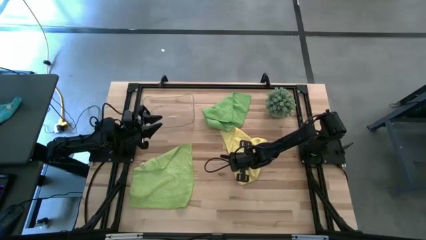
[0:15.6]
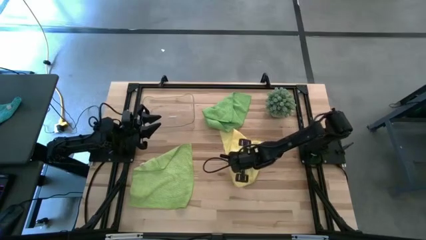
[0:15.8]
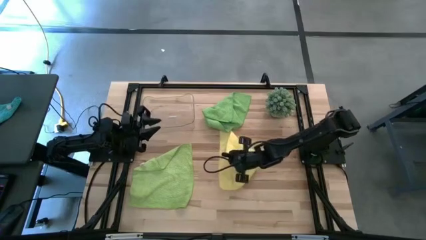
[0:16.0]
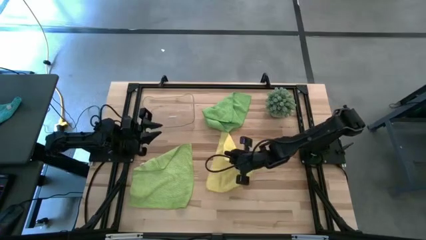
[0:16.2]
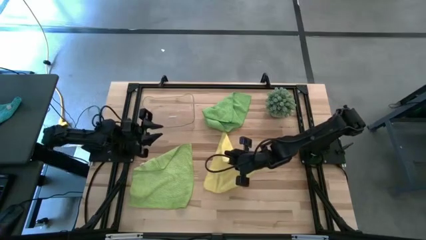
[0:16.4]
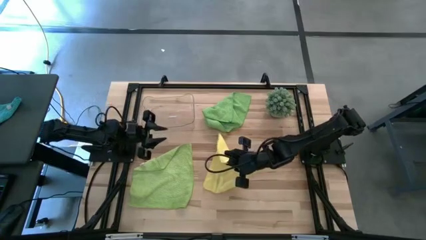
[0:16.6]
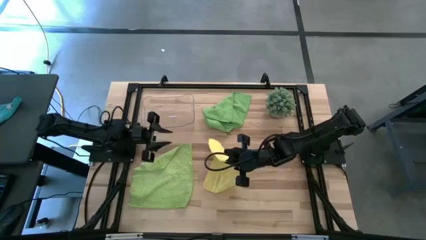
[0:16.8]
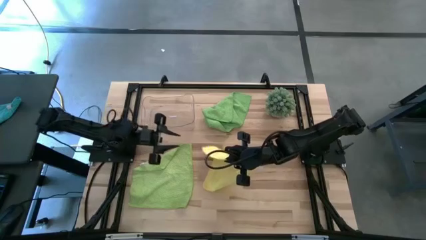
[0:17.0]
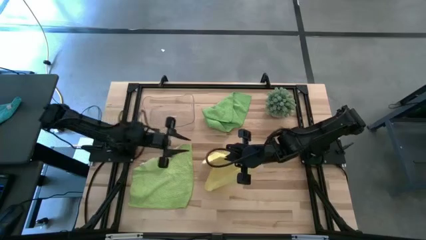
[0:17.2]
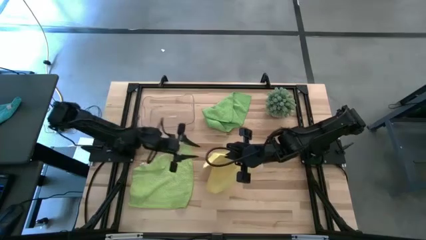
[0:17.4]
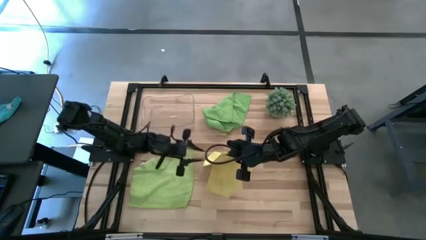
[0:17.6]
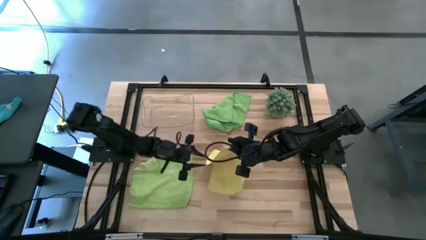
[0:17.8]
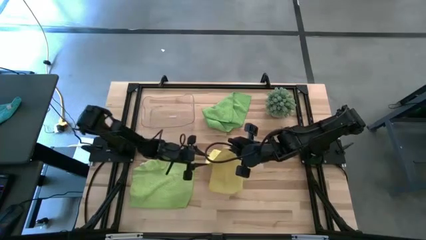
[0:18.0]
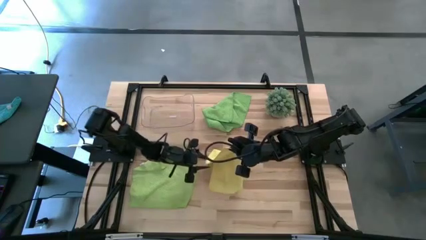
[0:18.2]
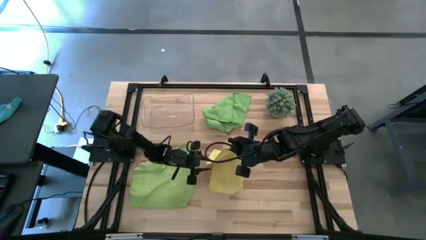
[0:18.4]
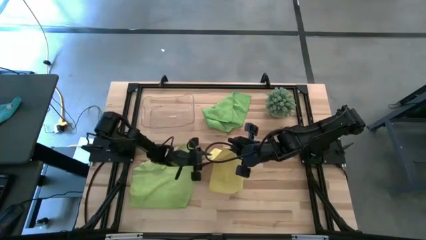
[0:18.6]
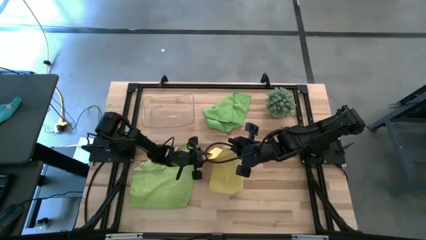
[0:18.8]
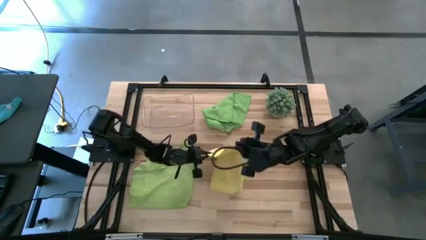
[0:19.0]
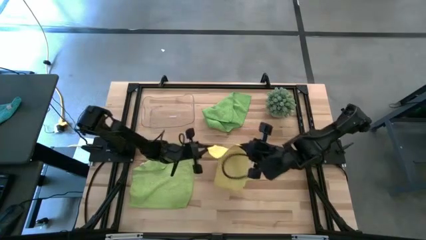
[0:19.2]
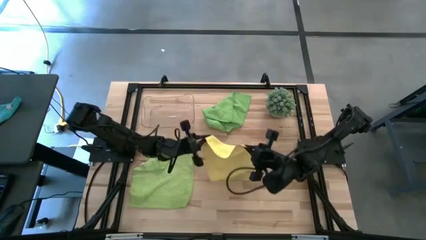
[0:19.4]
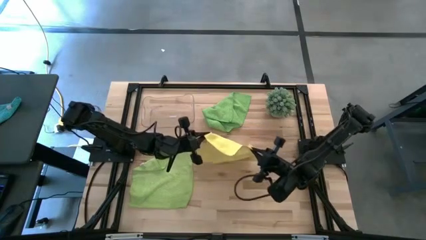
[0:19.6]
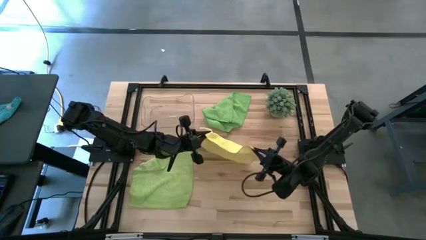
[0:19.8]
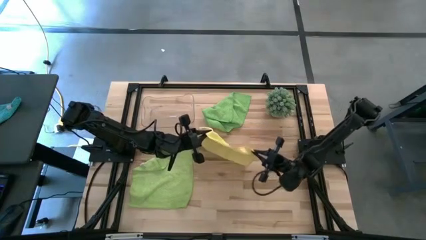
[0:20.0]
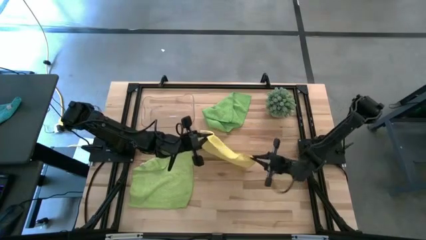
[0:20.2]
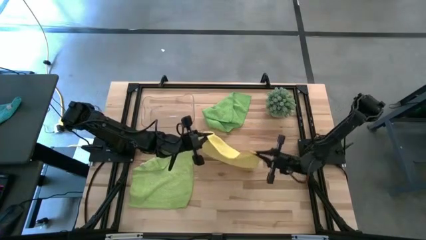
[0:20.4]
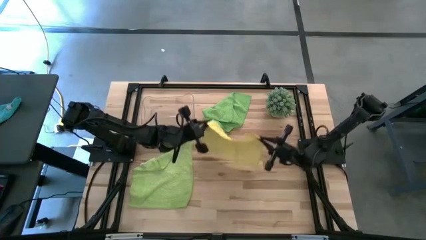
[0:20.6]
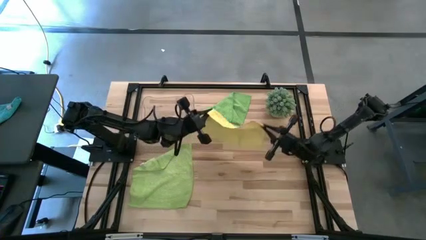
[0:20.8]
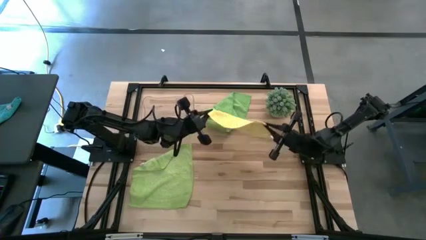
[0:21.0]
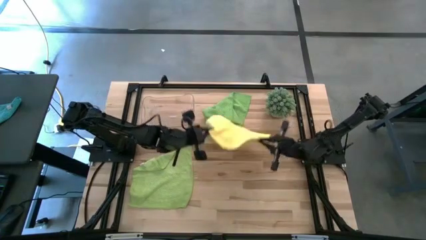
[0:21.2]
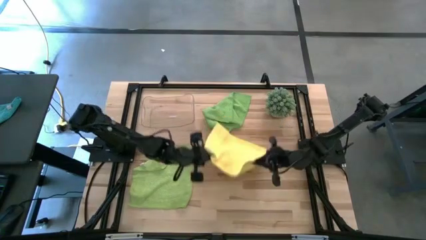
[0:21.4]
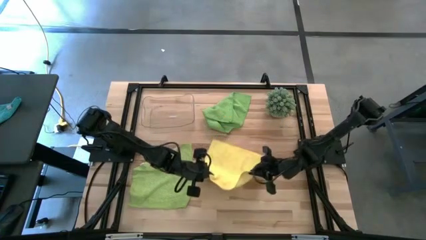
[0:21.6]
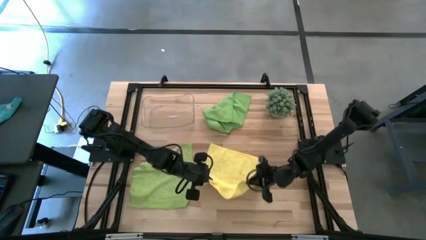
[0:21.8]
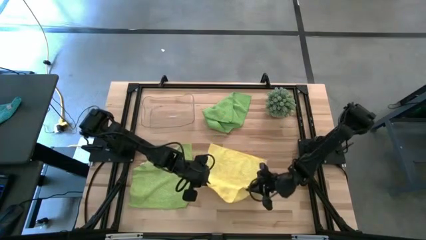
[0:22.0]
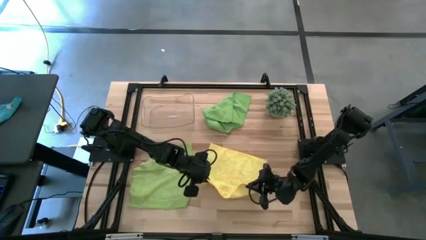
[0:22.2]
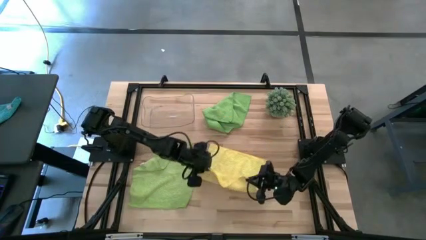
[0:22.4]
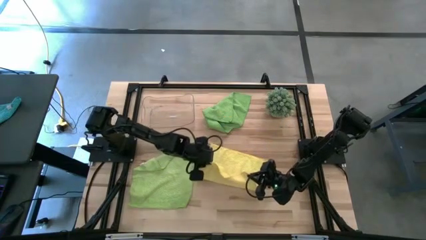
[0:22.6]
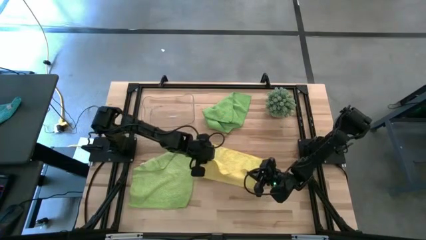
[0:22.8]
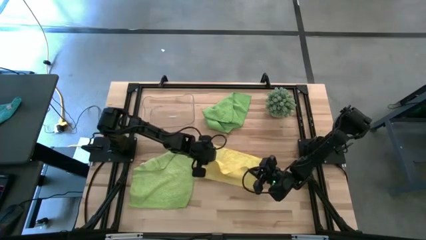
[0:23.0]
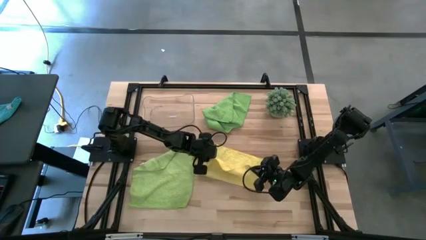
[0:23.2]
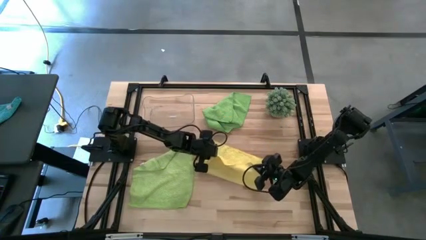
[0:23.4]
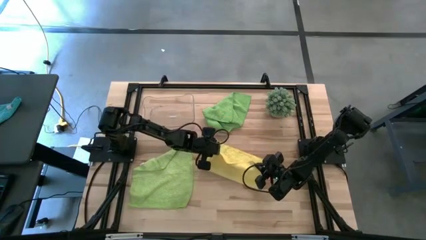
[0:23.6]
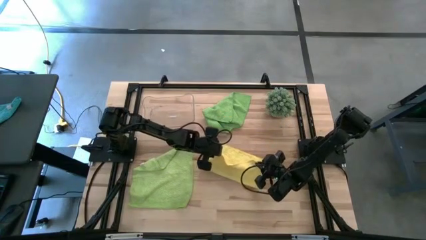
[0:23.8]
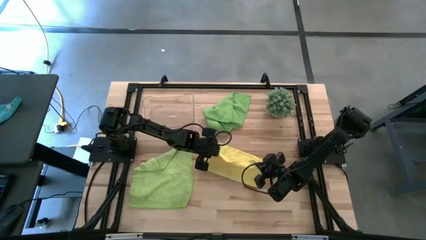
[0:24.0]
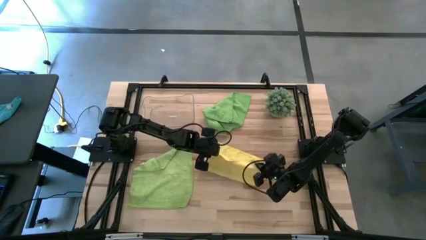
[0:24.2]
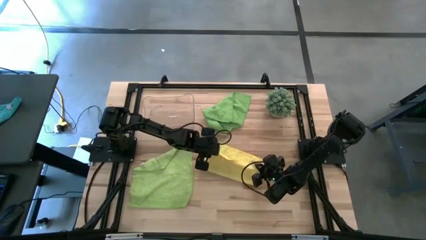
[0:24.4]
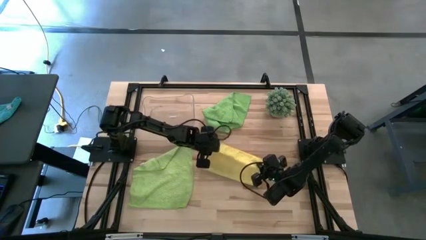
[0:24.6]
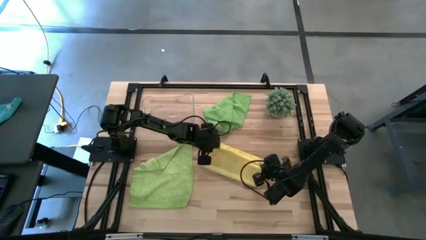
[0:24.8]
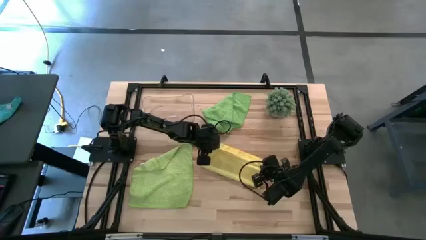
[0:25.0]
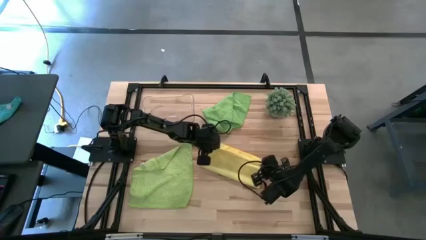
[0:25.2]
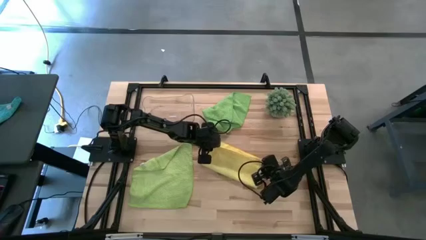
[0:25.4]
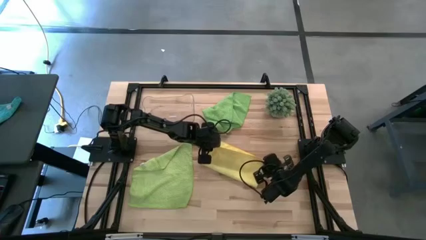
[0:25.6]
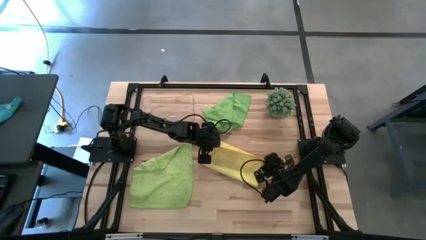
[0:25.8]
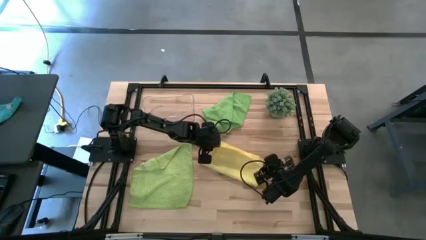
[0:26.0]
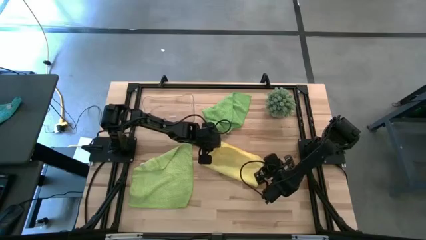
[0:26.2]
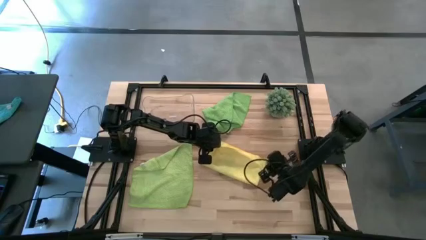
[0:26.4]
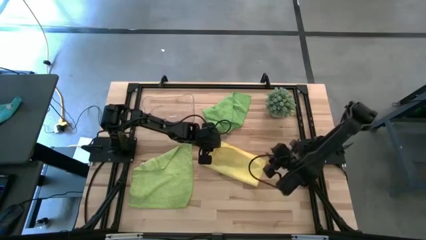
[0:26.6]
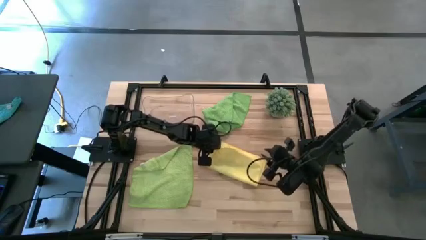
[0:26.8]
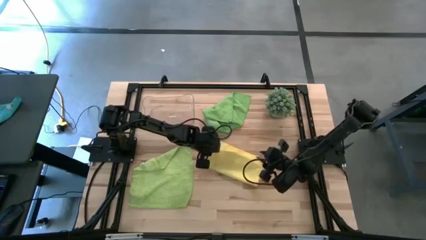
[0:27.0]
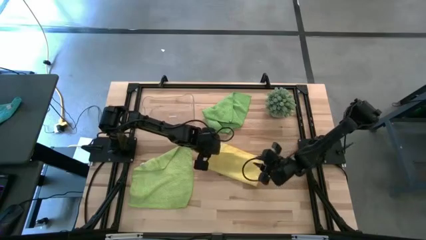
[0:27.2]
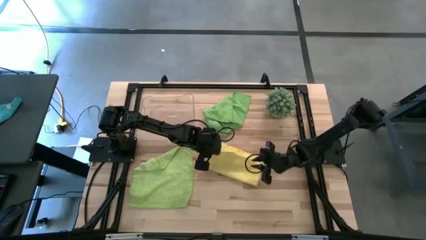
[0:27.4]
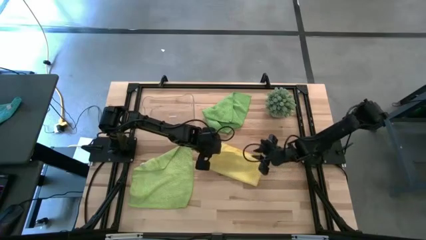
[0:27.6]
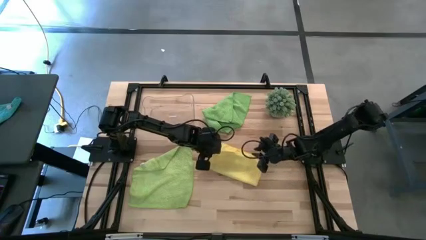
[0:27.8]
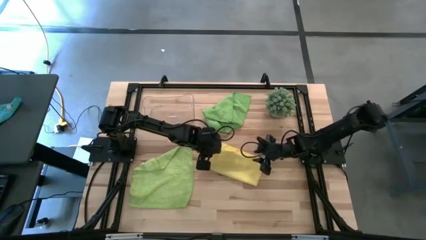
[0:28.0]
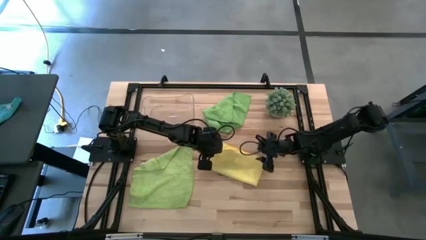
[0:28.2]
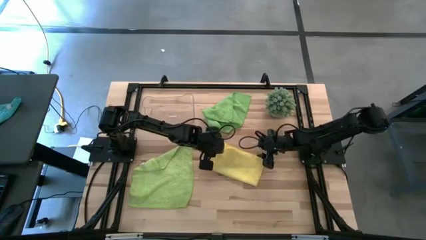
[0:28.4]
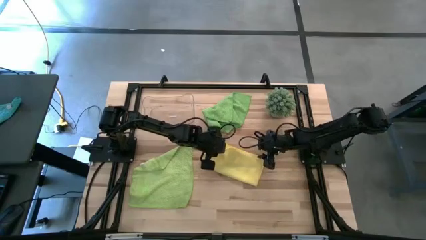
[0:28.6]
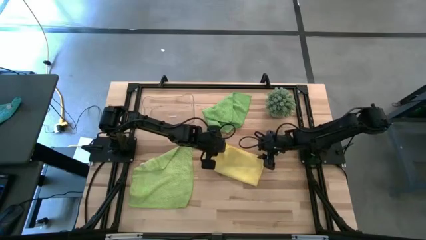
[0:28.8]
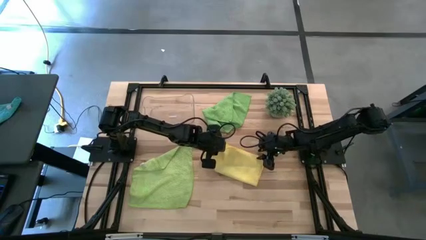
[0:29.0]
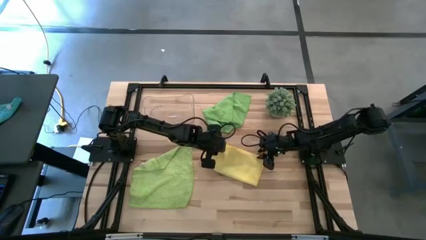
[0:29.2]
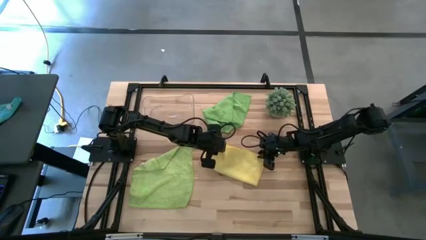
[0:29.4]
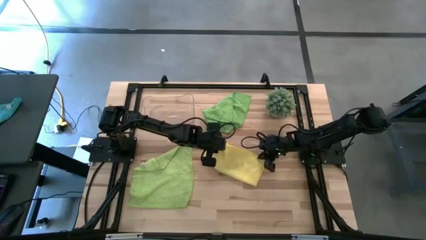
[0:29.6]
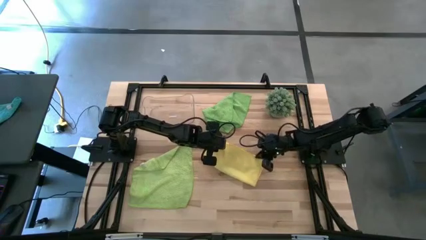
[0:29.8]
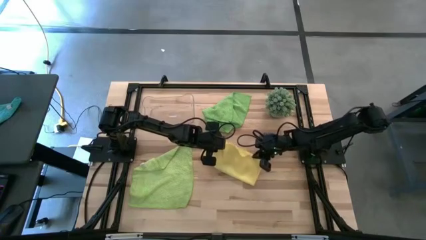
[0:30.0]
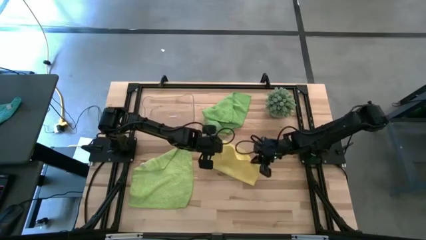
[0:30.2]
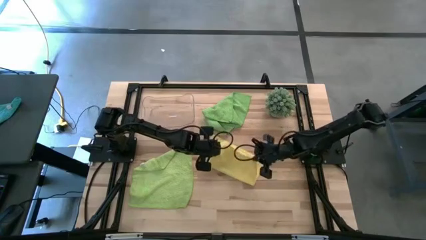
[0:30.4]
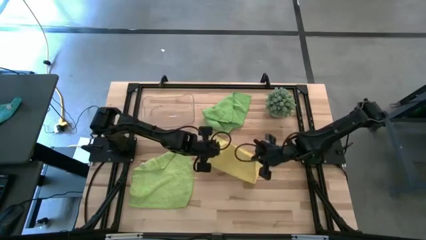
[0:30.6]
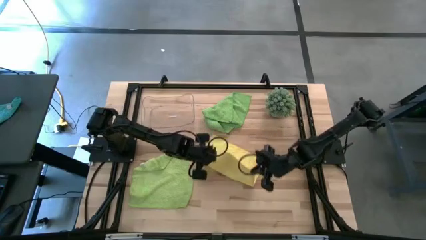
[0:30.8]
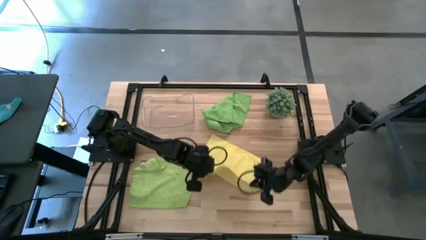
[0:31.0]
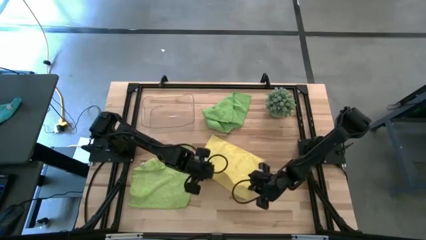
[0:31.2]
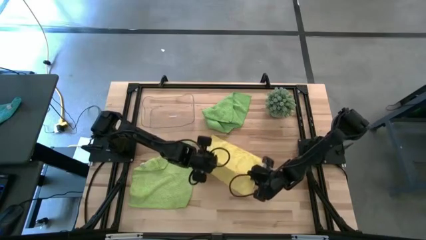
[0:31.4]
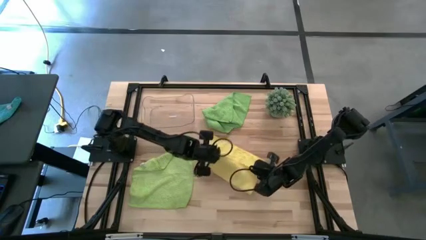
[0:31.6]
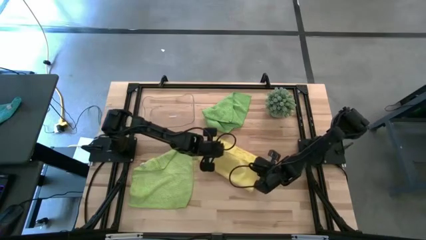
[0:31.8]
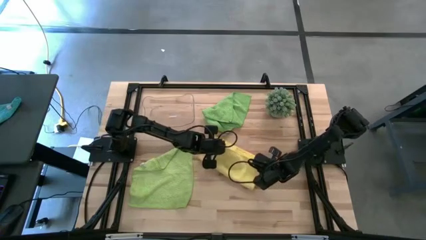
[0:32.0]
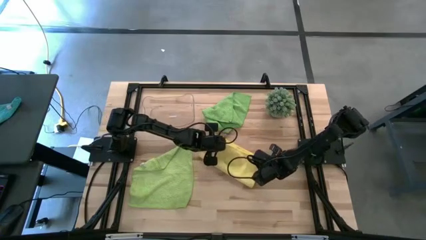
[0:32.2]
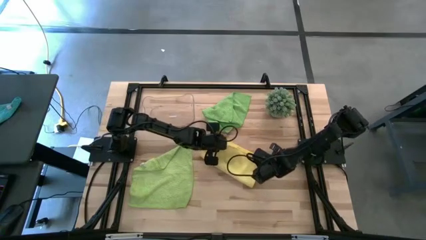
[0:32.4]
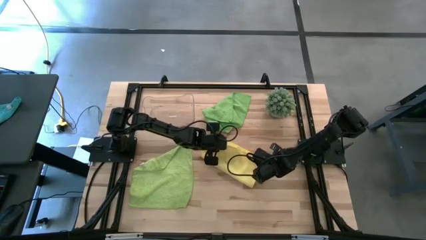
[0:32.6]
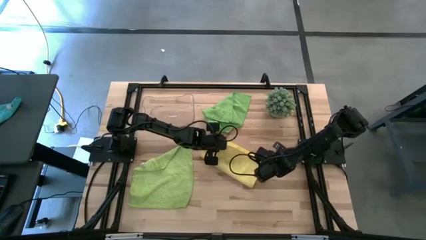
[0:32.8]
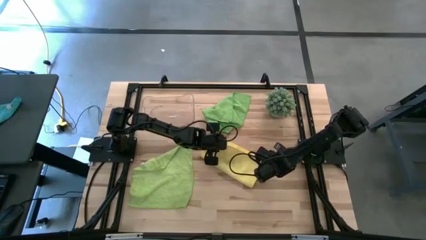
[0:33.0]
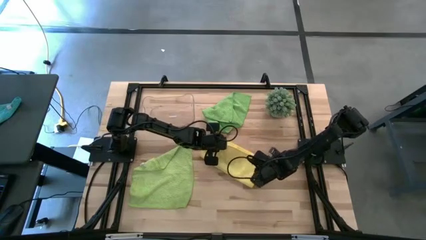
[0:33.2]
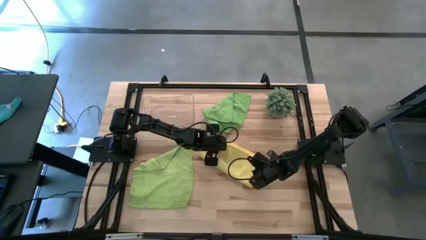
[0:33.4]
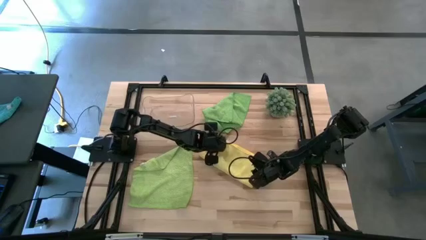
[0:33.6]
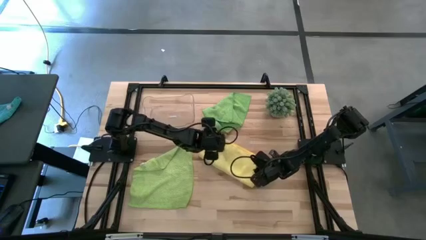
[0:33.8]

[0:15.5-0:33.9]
Task: Roll microfiber towels into tight, uniform cylinder then place into a basket
Fold the yellow towel
